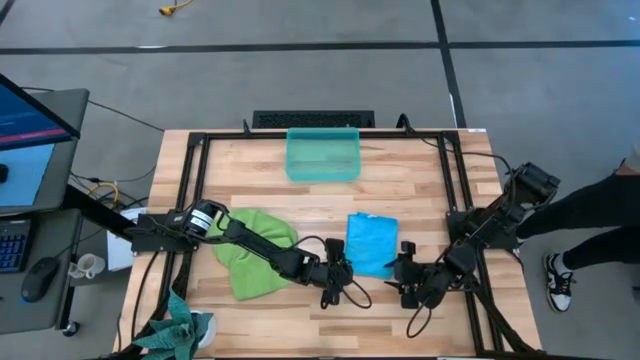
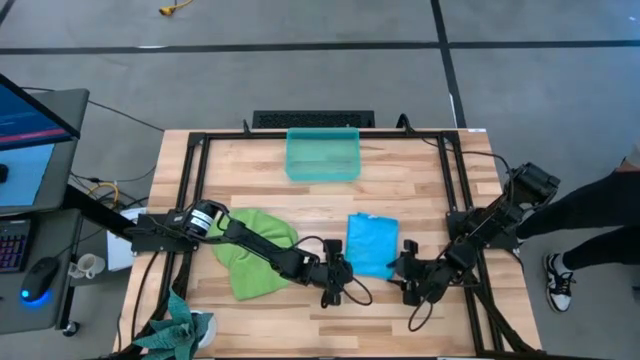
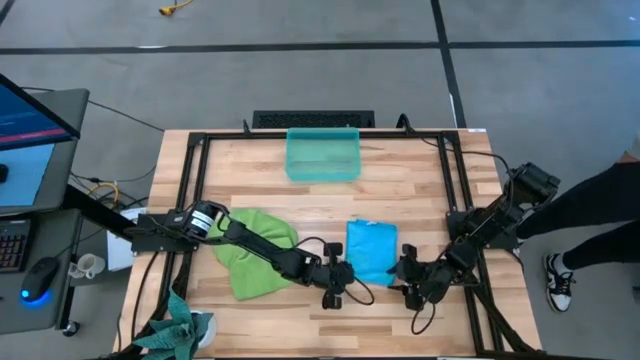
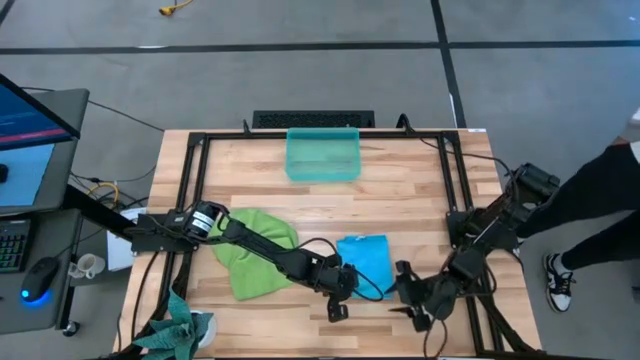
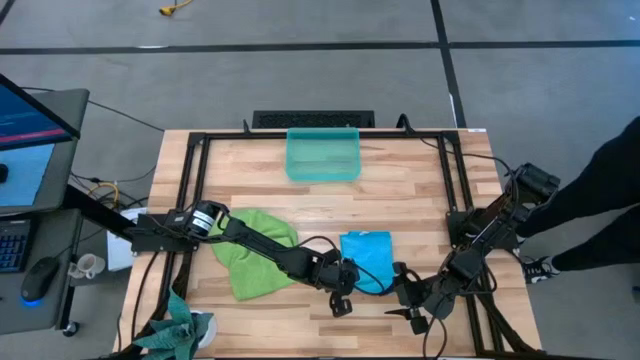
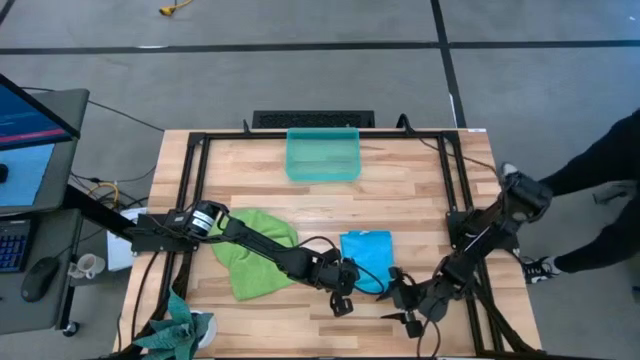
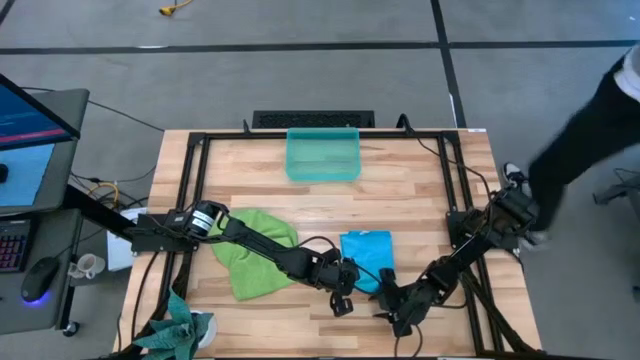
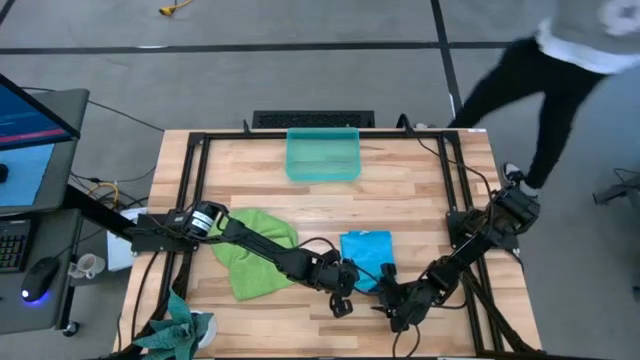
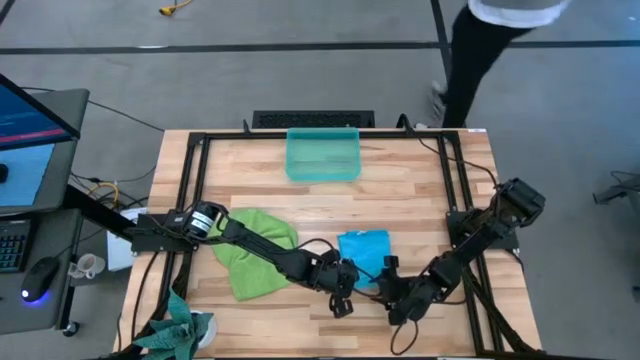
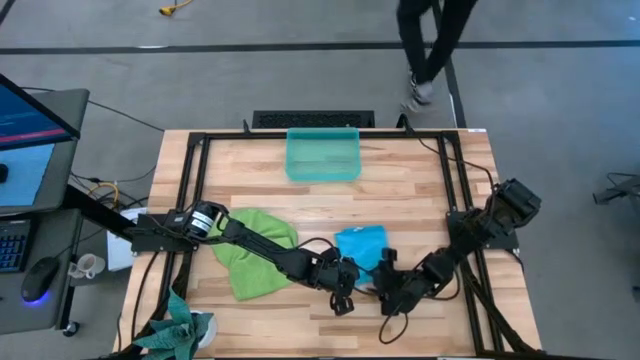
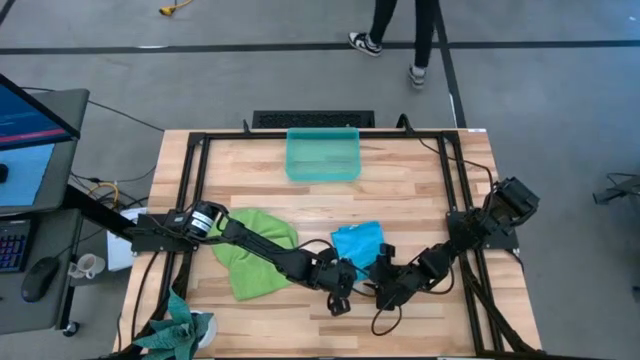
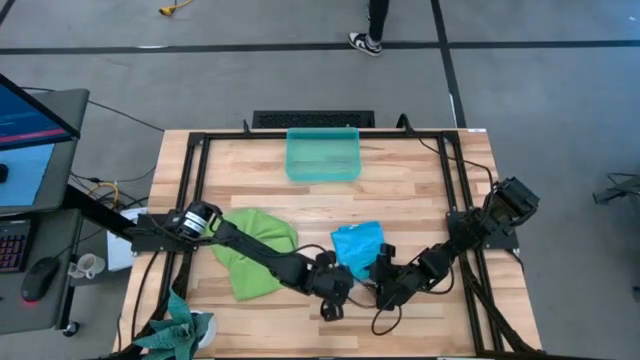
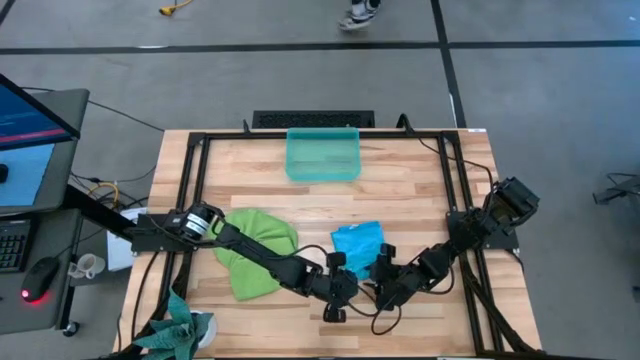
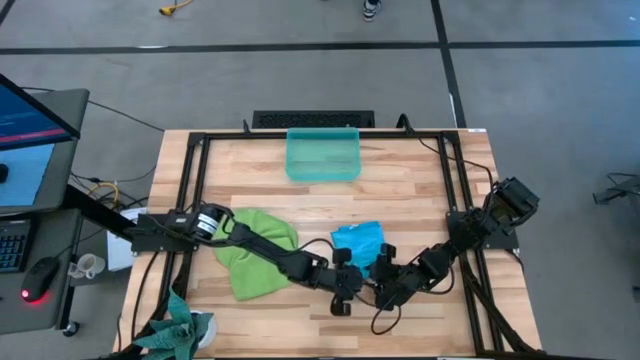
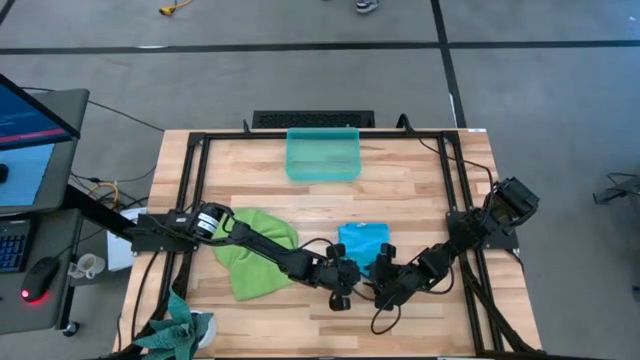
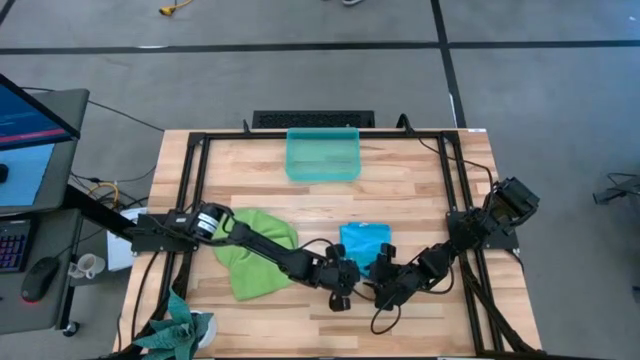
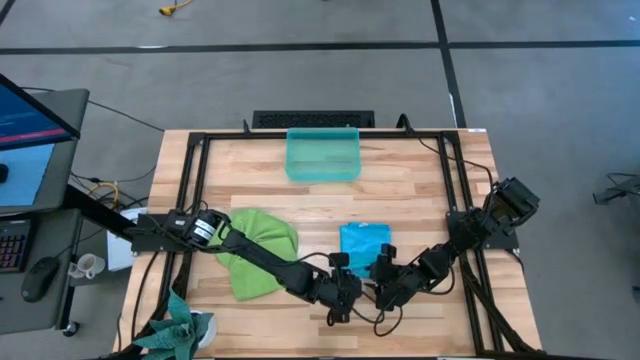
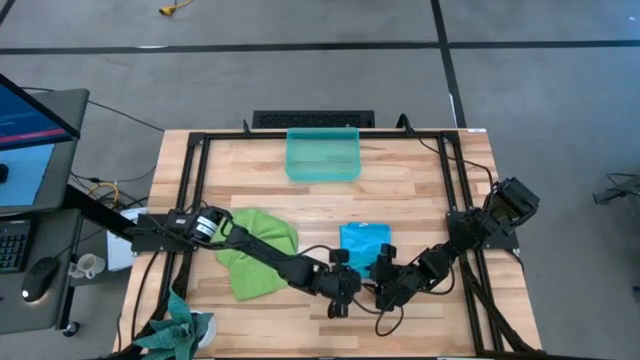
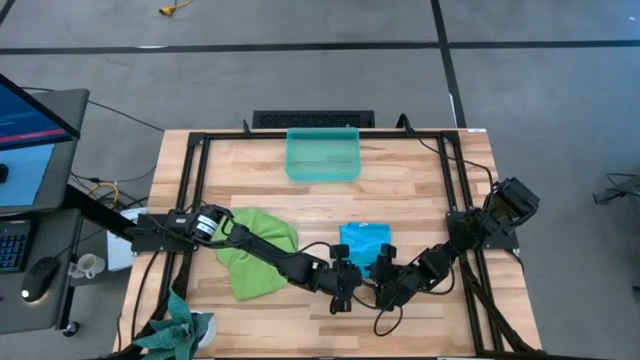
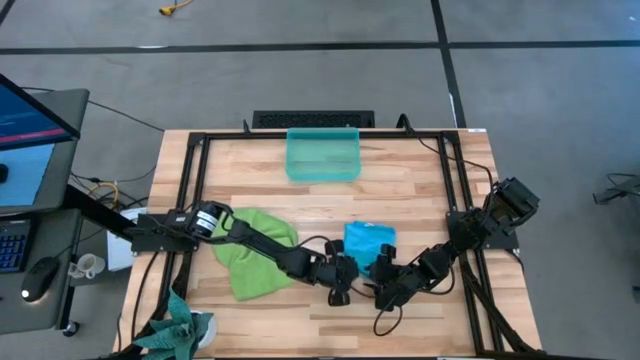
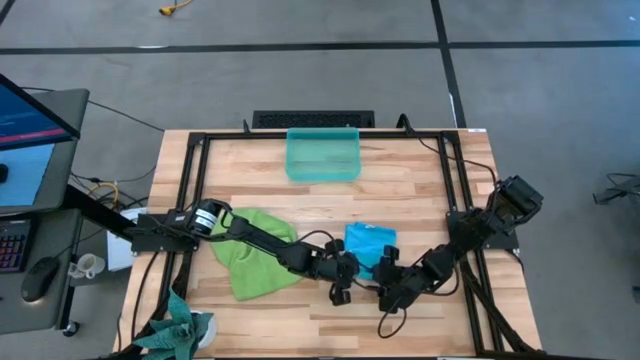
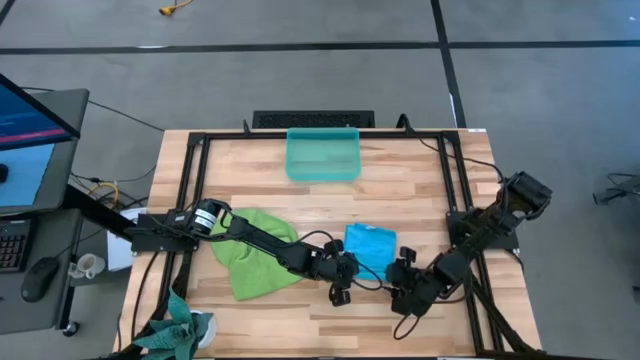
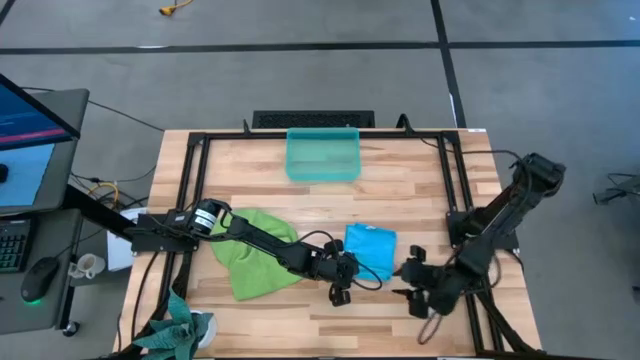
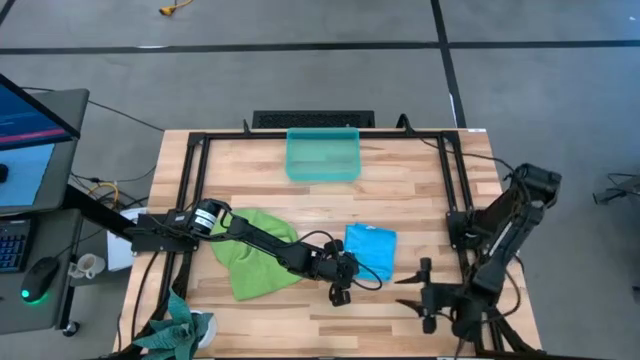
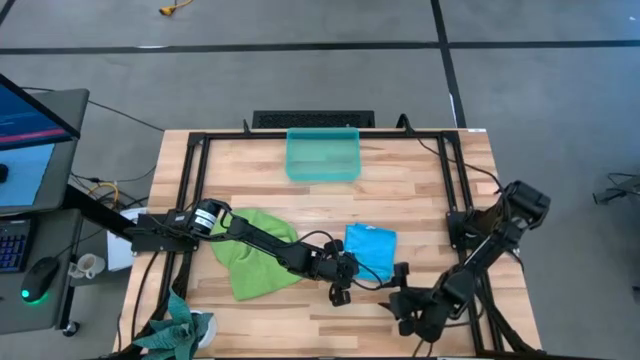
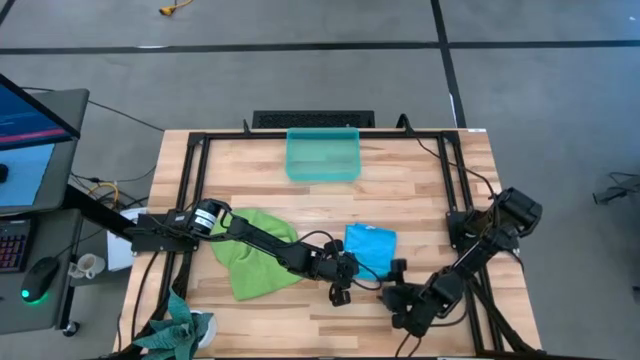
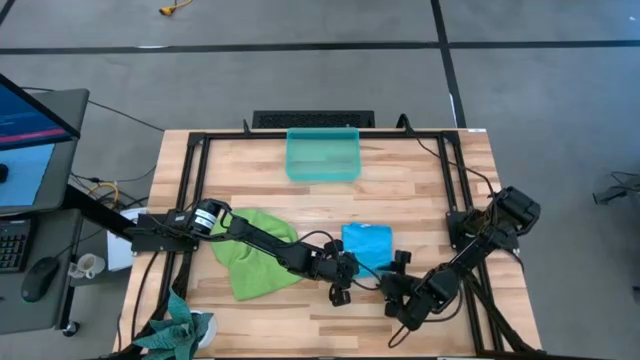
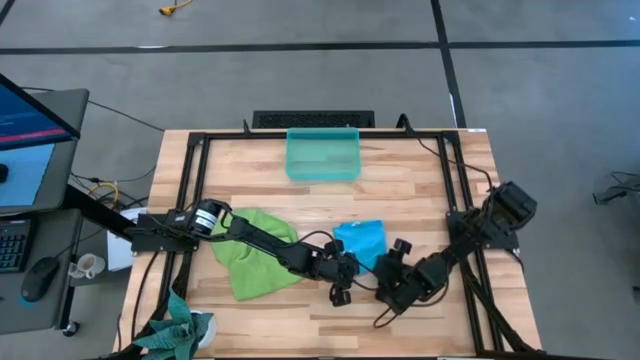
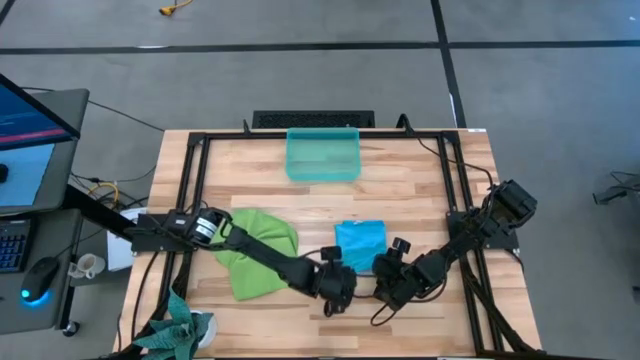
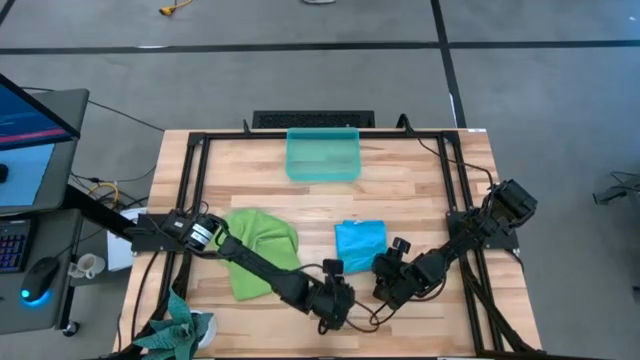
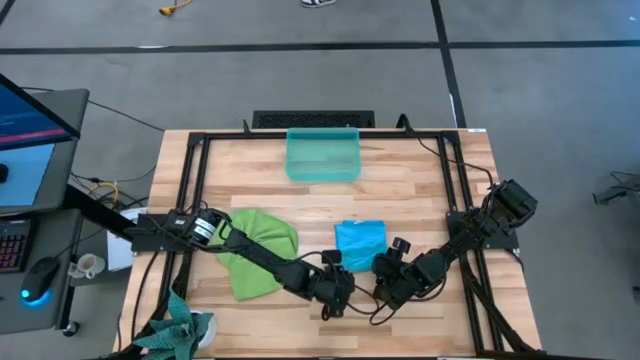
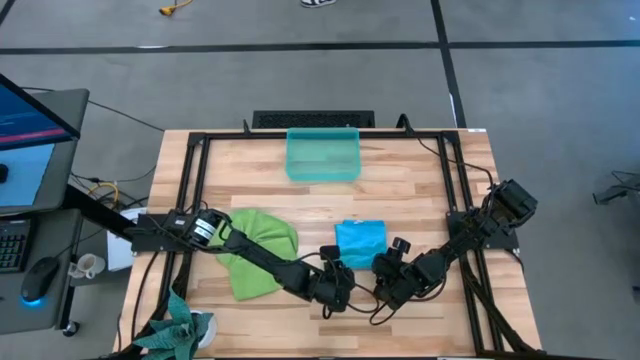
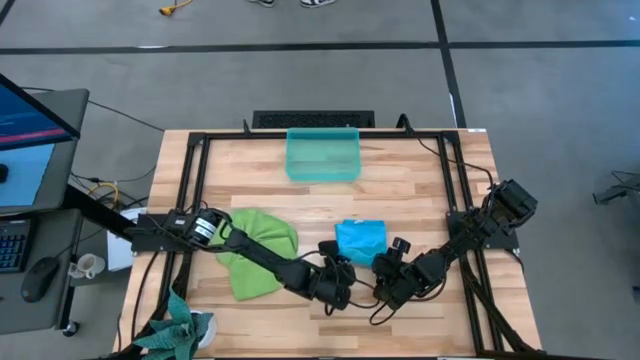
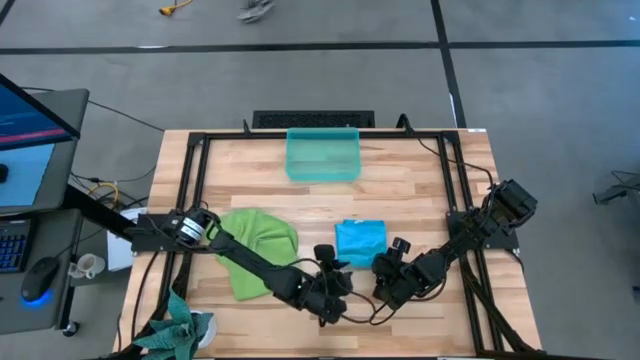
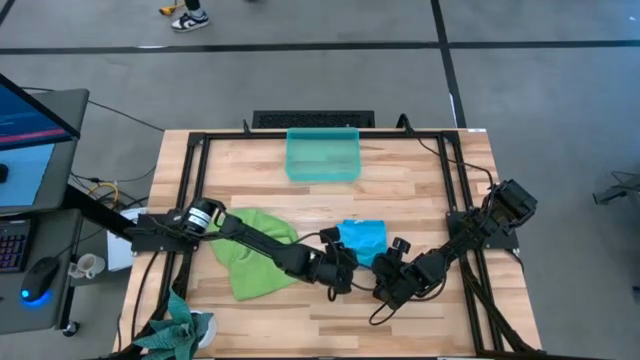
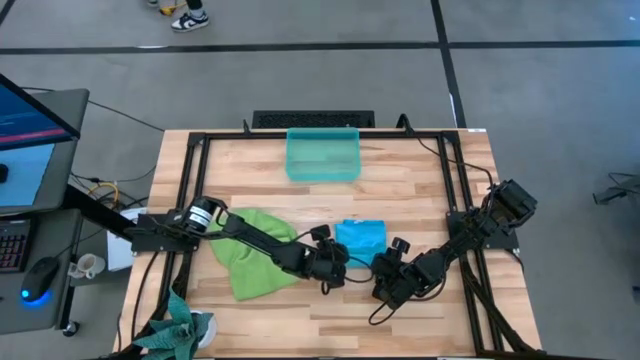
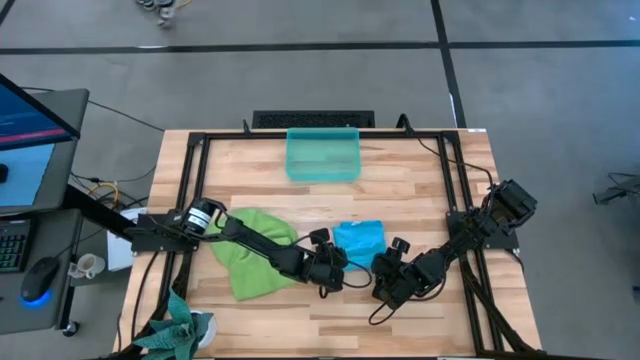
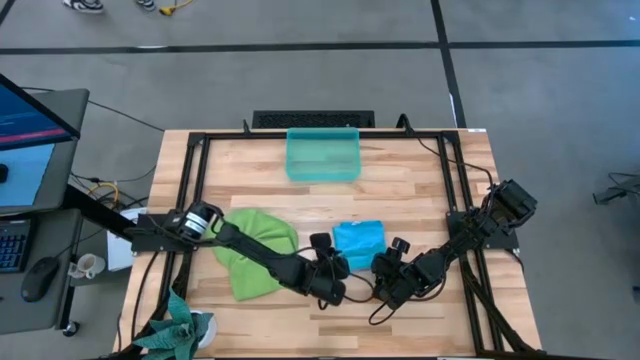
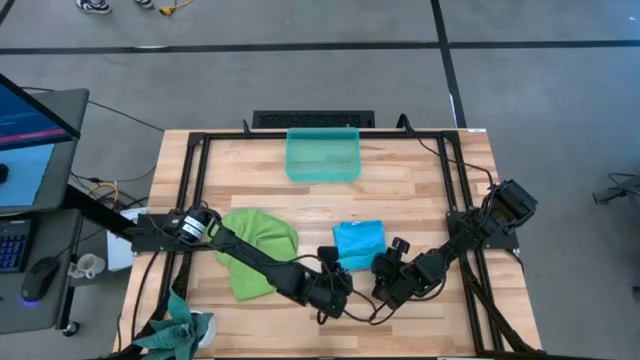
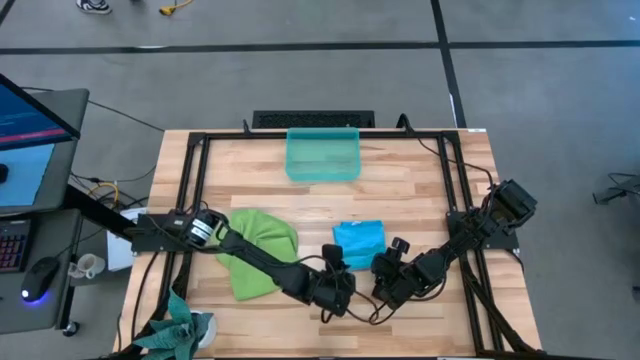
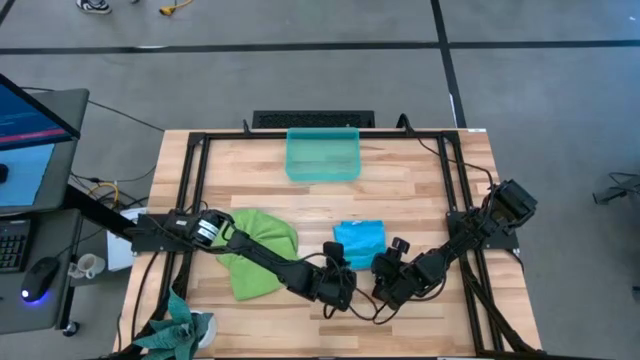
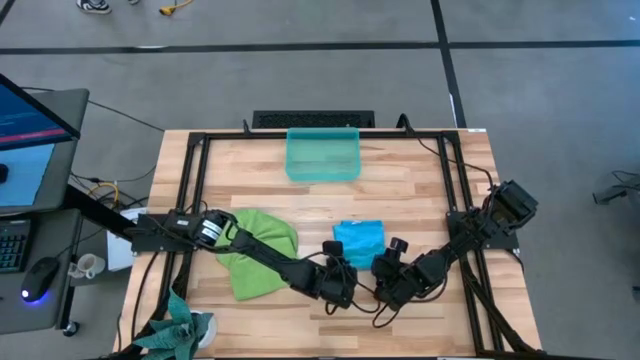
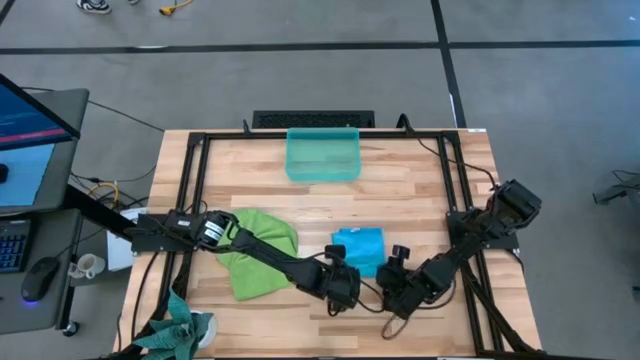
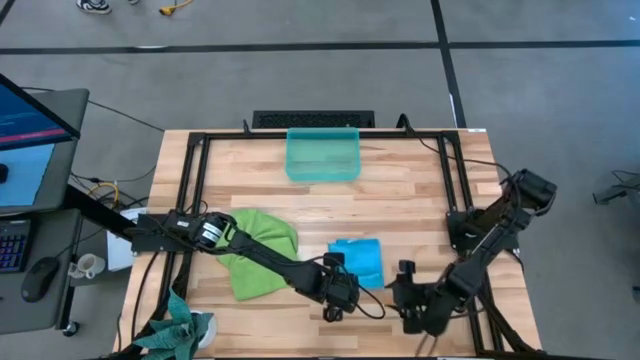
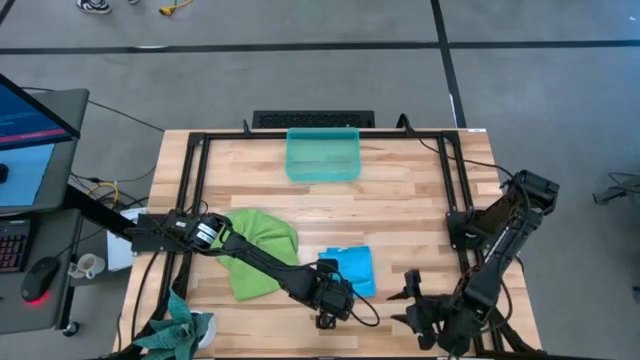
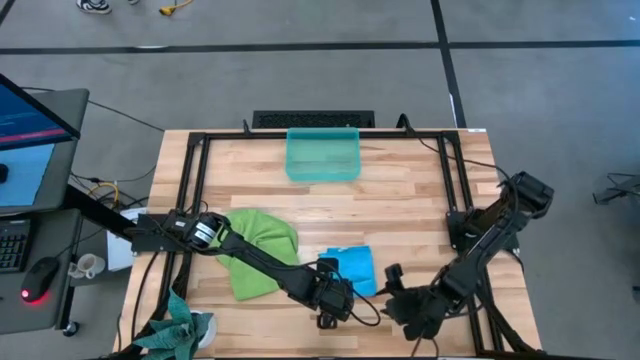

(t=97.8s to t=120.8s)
Task: Roll microfiber towels into tight, uniform cylinder then place into a basket
Roll the blue microfiber cloth
